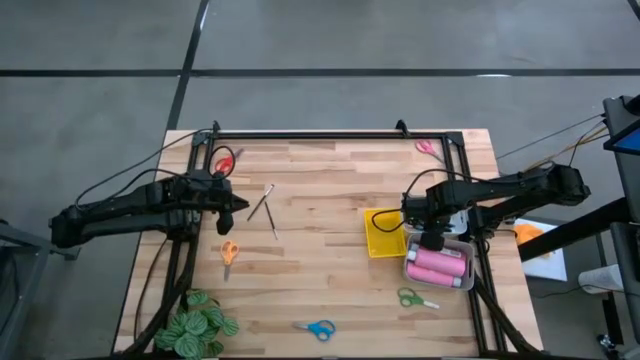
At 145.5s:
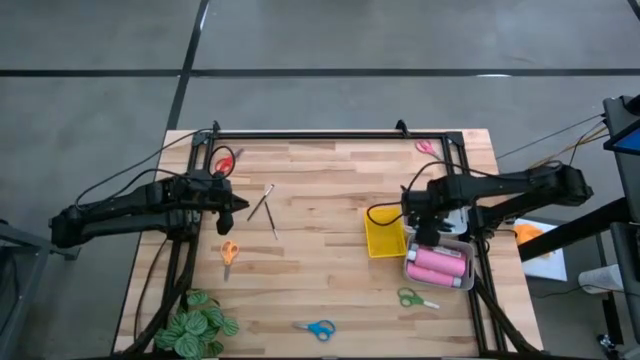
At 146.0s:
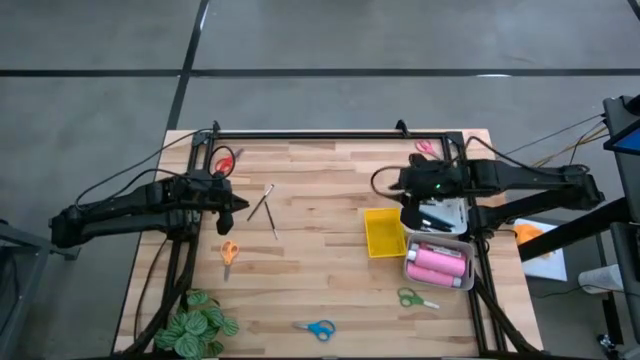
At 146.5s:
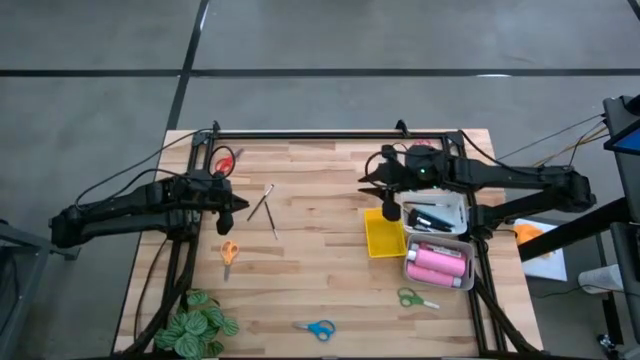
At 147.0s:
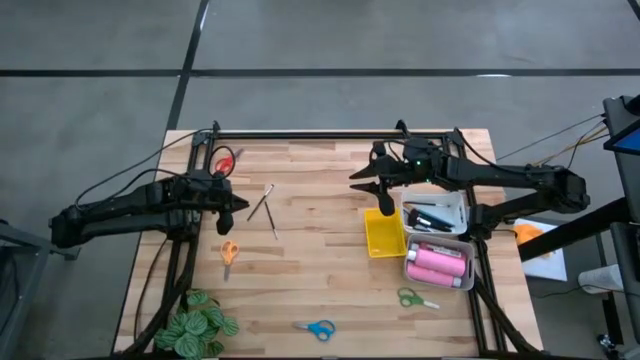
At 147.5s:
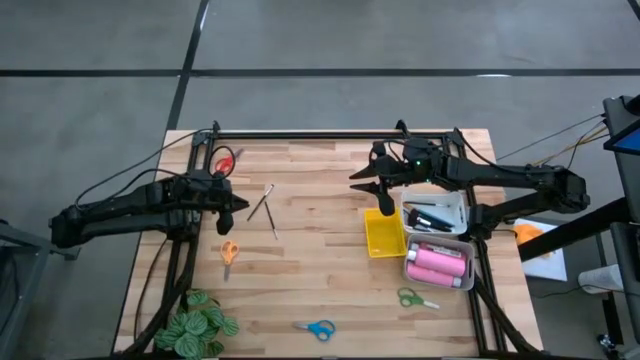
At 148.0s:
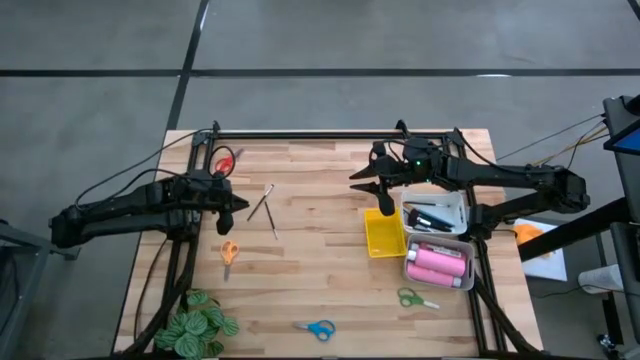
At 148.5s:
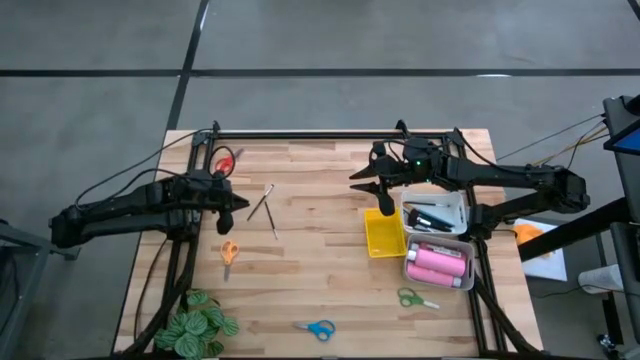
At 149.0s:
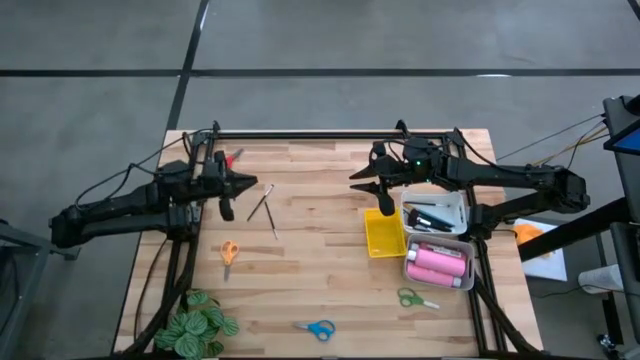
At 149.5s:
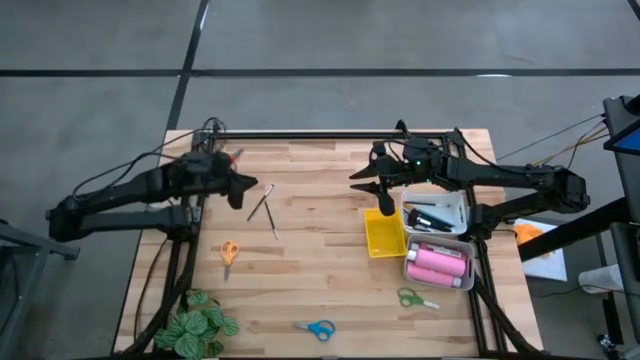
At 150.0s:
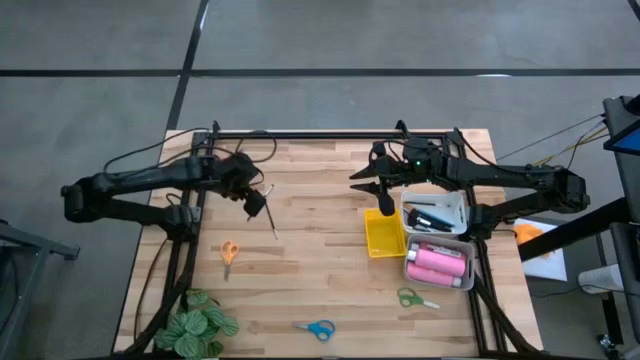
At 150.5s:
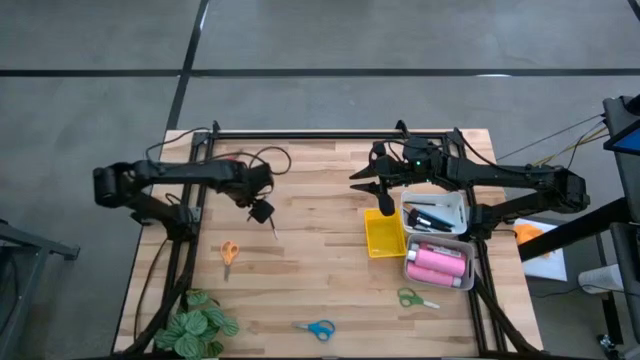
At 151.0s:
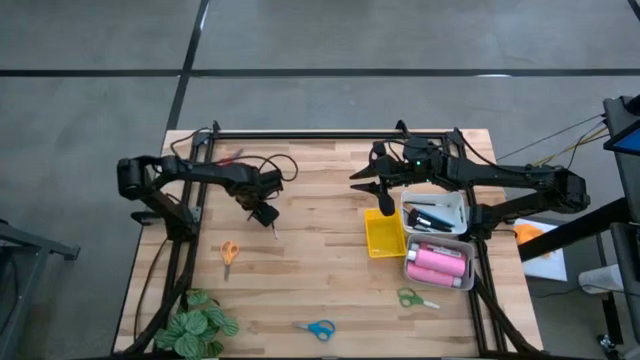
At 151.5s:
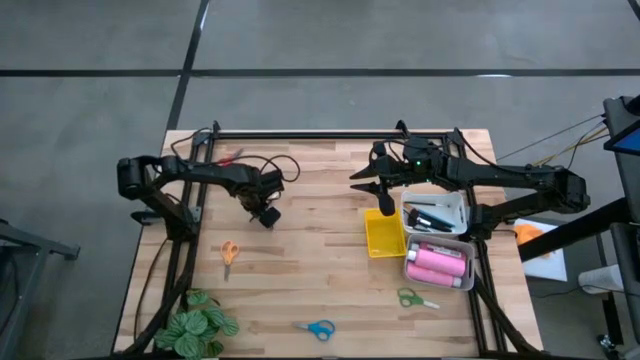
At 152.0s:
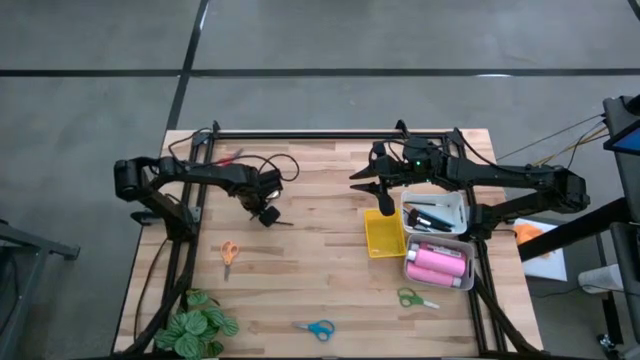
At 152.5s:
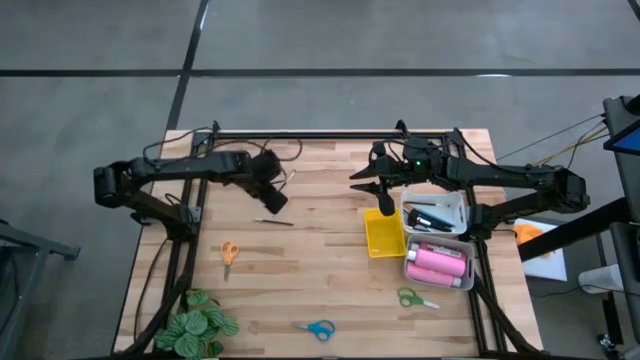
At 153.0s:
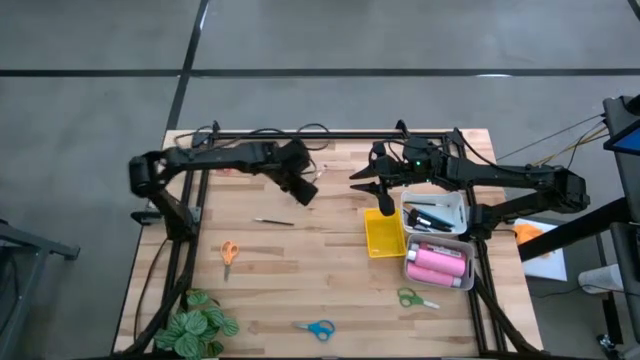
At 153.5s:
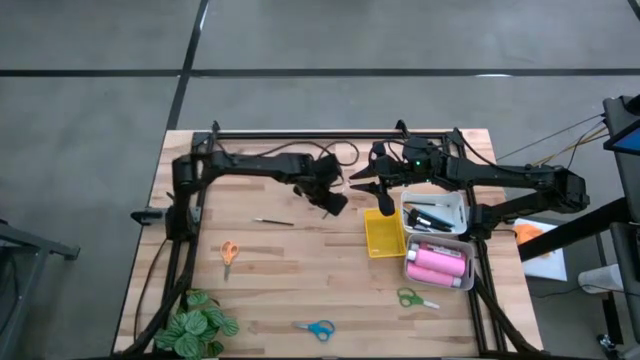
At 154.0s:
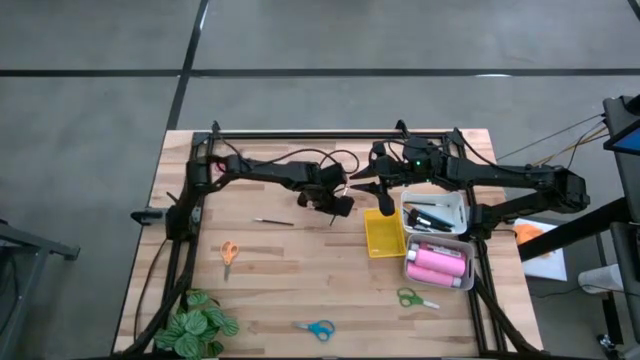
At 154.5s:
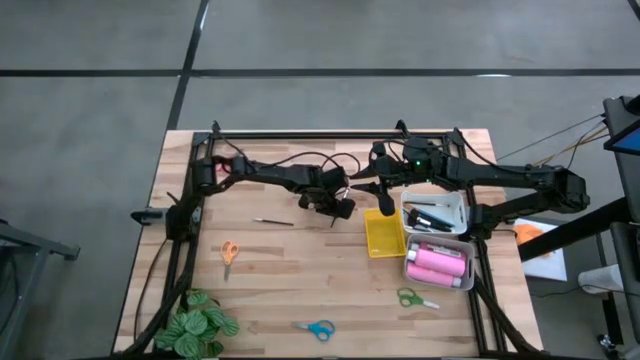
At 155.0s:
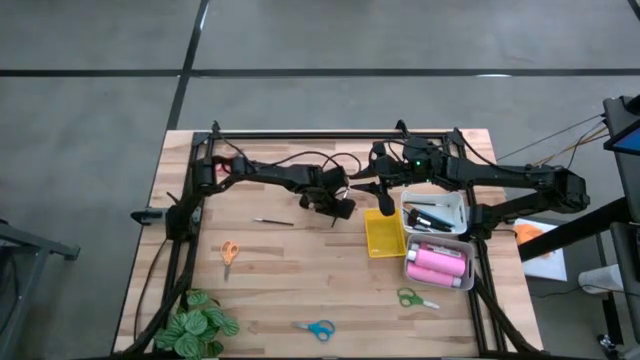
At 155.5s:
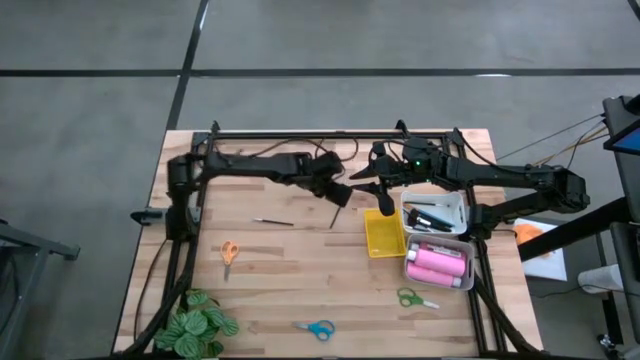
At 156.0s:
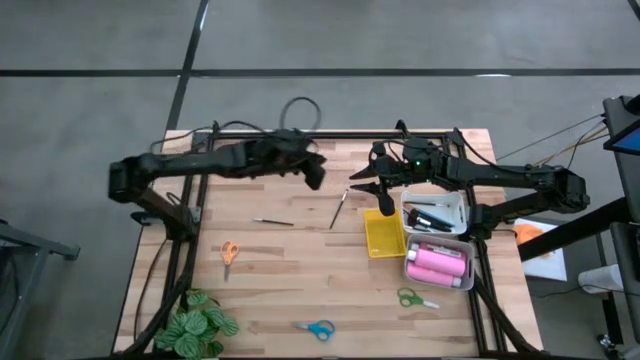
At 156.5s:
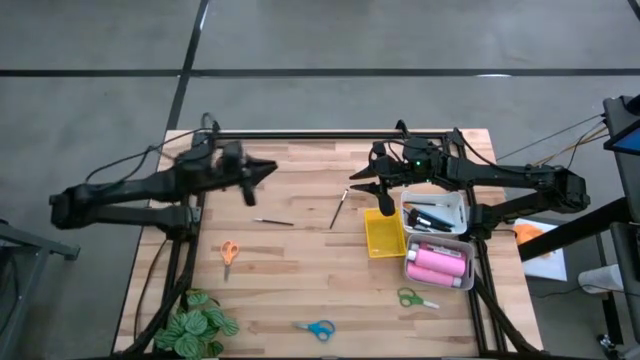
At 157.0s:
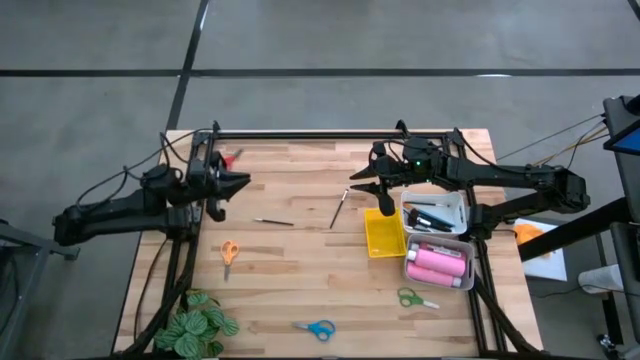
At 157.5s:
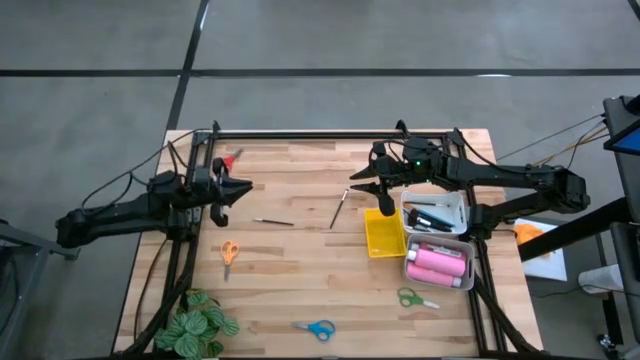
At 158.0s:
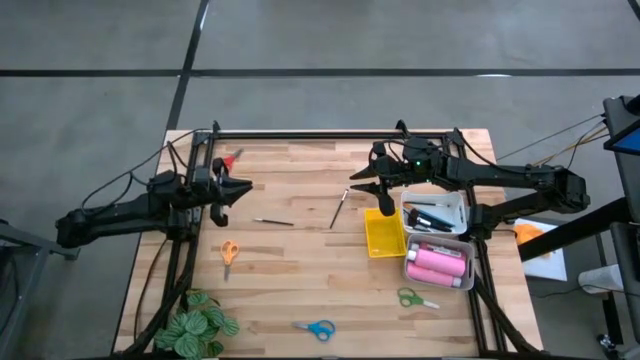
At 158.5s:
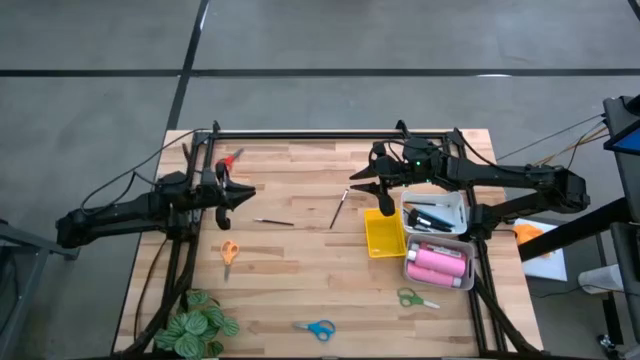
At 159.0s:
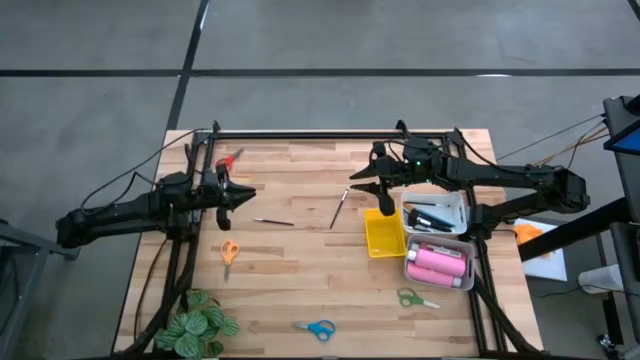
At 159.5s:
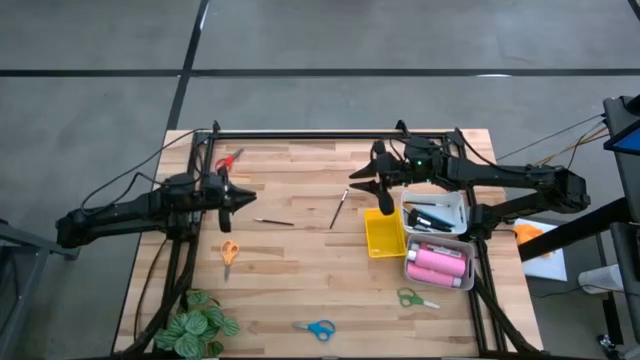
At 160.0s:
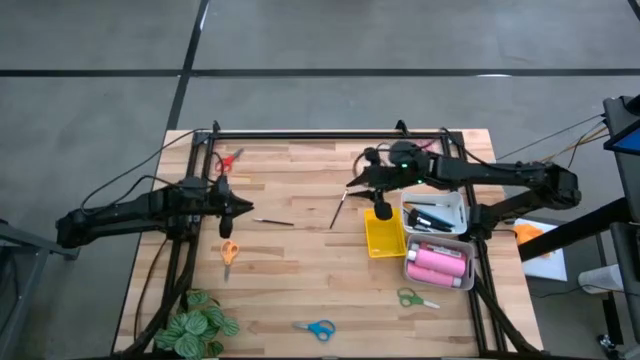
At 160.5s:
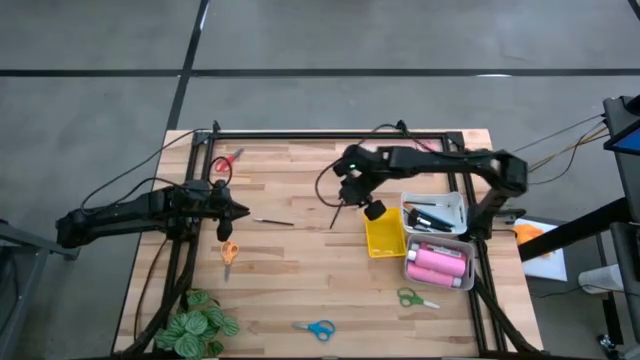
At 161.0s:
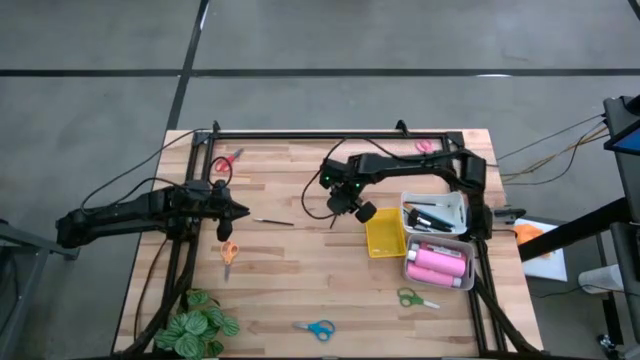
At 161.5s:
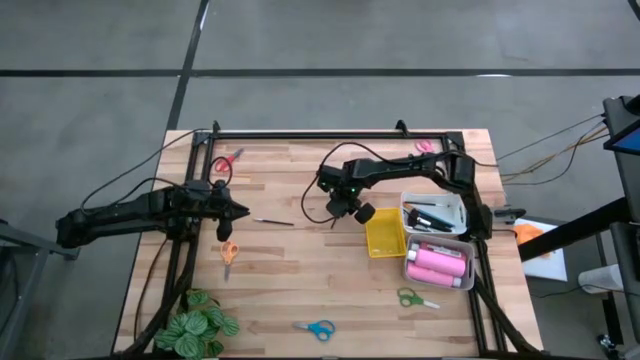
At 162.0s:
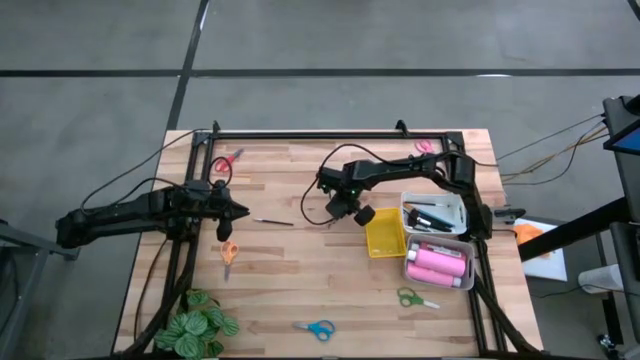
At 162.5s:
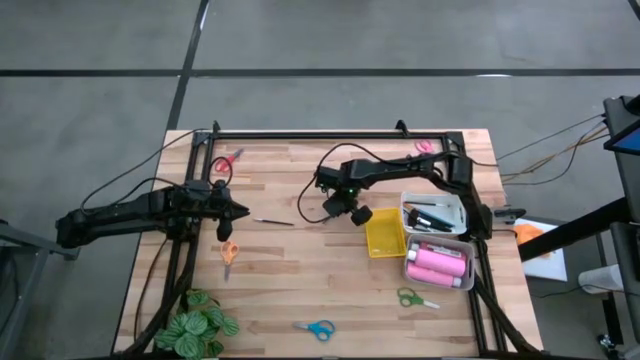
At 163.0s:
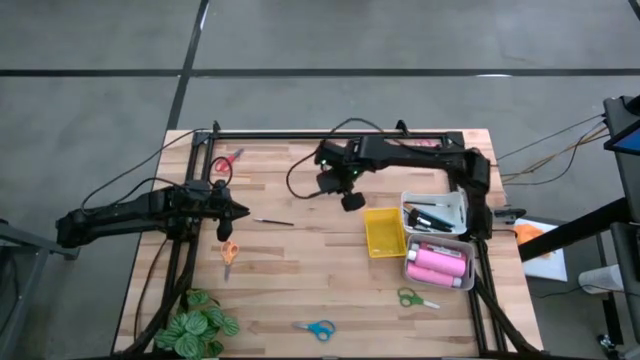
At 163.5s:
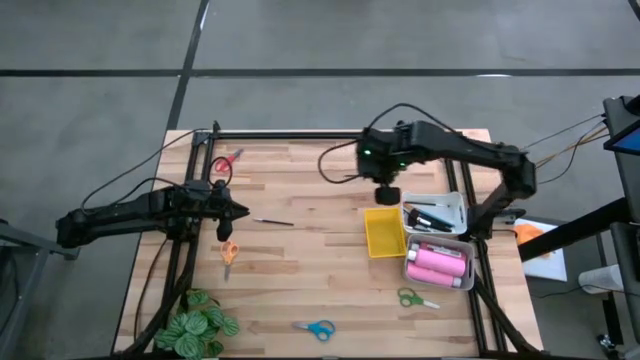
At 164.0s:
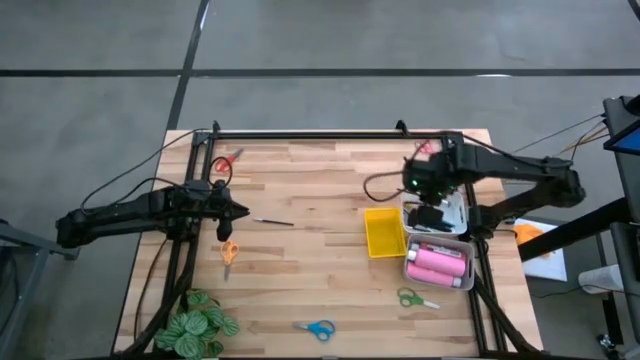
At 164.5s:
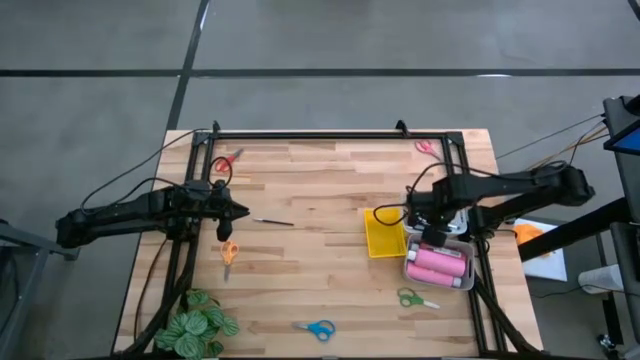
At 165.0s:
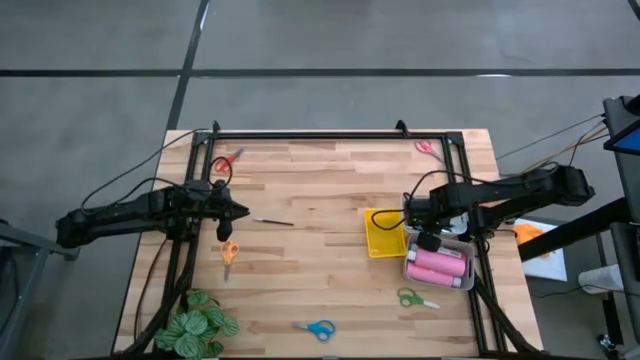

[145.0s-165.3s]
Task: Pick & Place Paint Supplies
Put the black paint brush into the white bin

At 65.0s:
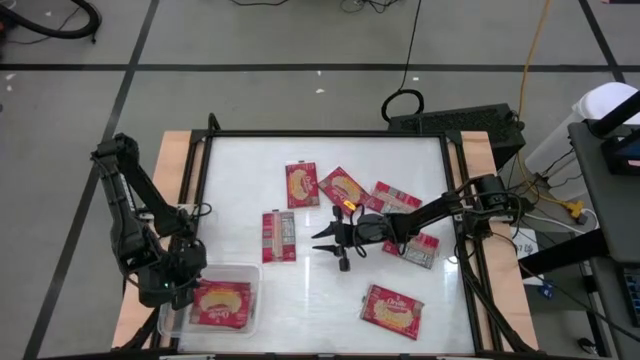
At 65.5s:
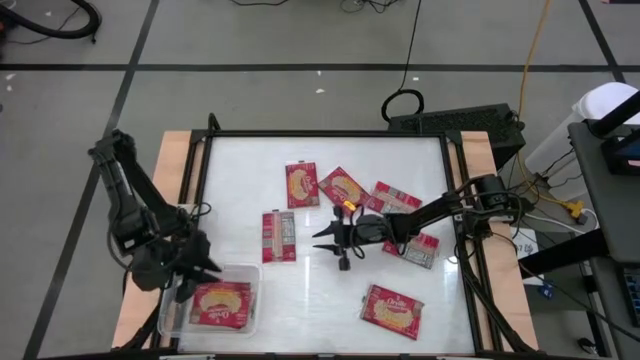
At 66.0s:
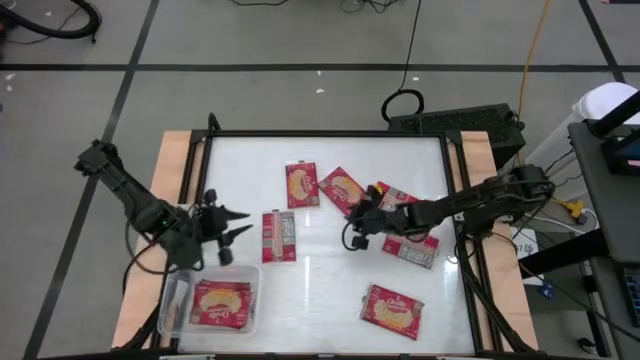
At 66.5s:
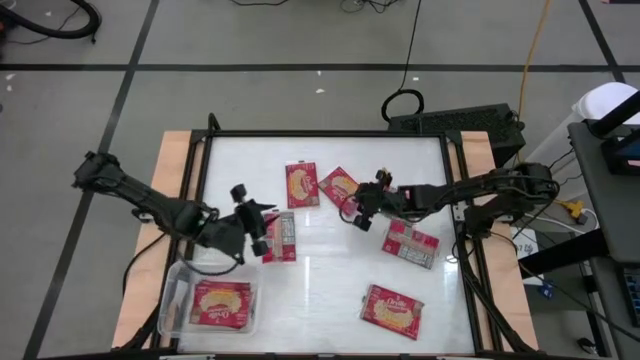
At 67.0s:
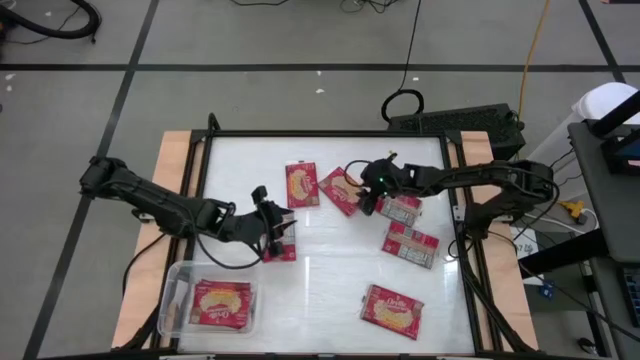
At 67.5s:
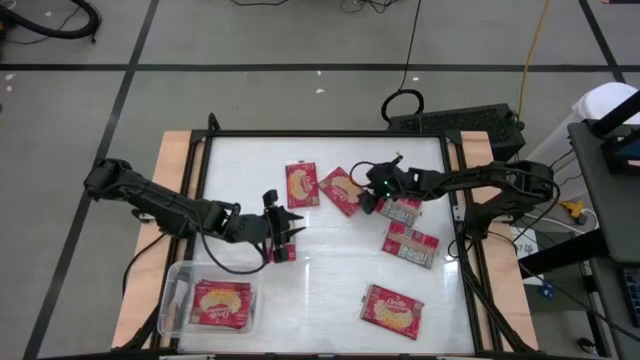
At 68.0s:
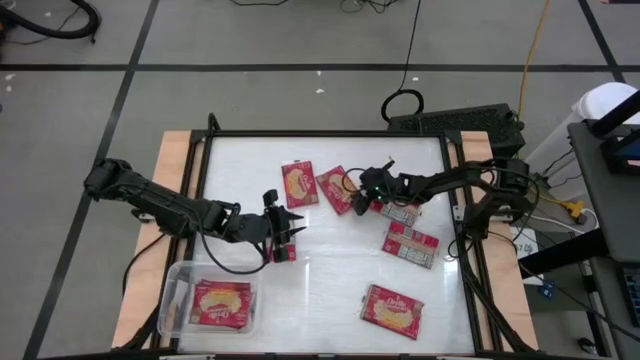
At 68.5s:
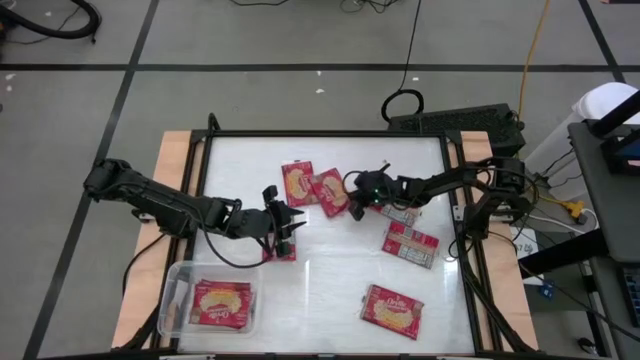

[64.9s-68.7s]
Task: Sort popcorn bags into baskets
Put the popcorn bag into the transparent bin
